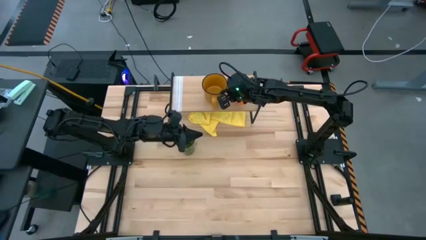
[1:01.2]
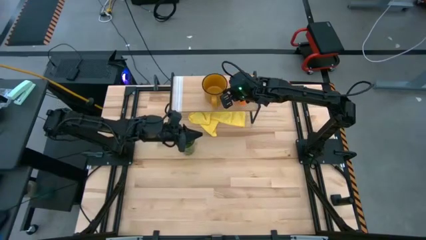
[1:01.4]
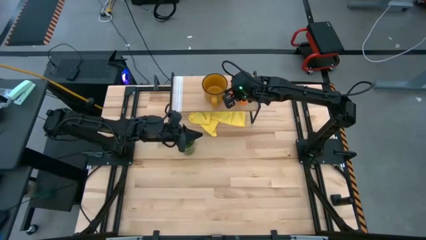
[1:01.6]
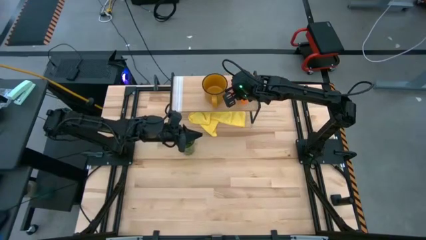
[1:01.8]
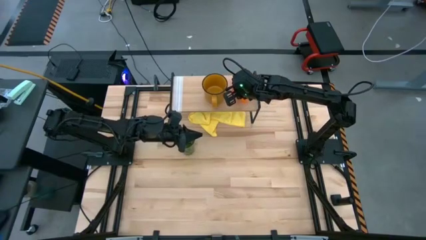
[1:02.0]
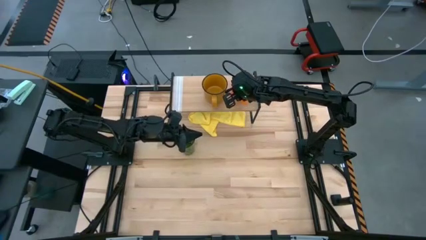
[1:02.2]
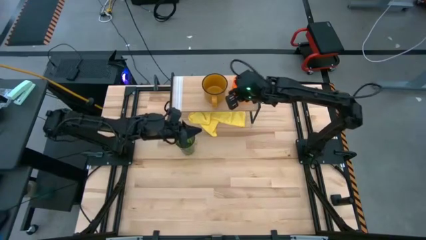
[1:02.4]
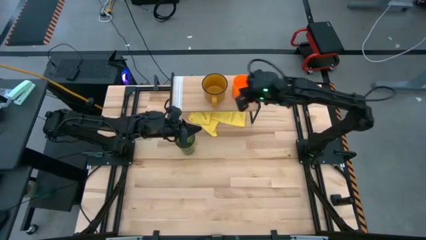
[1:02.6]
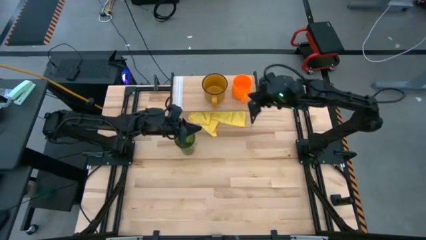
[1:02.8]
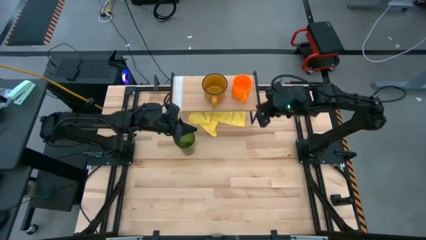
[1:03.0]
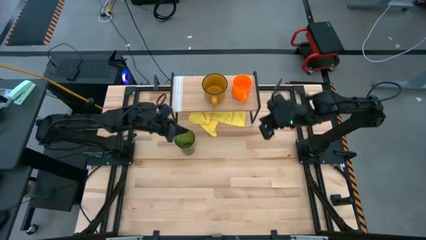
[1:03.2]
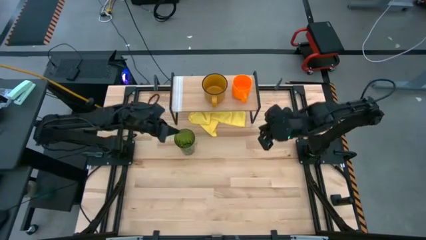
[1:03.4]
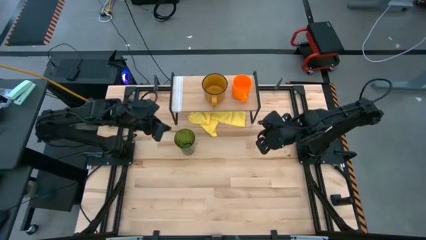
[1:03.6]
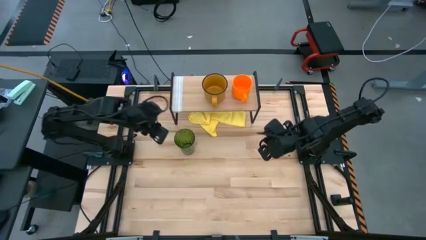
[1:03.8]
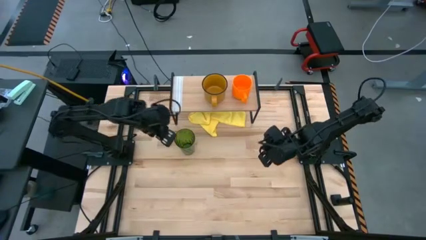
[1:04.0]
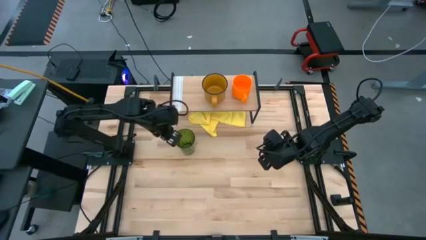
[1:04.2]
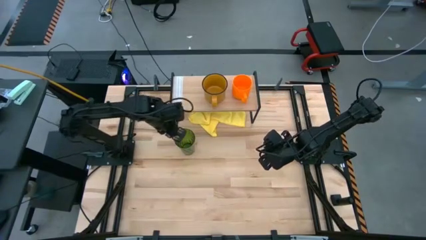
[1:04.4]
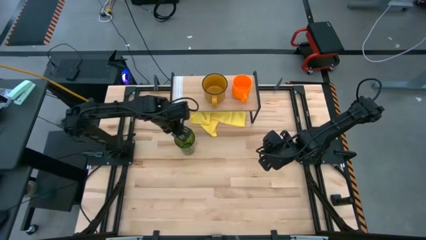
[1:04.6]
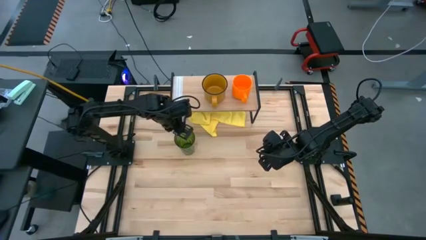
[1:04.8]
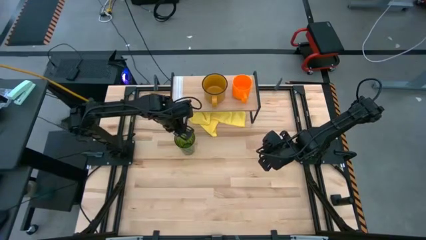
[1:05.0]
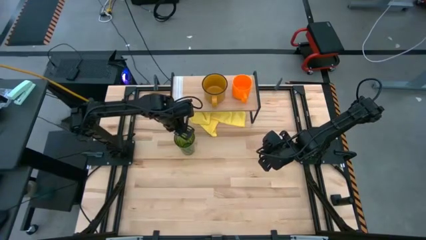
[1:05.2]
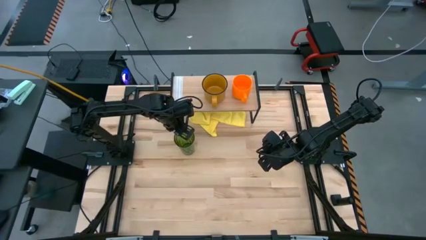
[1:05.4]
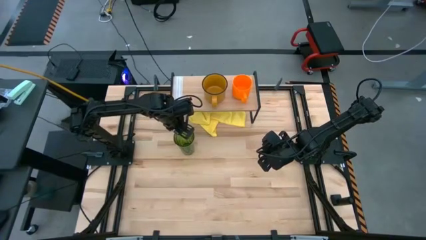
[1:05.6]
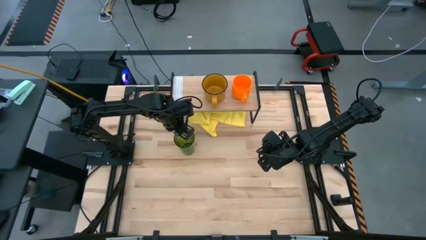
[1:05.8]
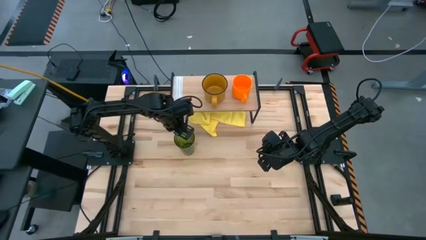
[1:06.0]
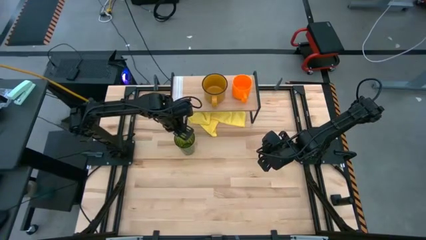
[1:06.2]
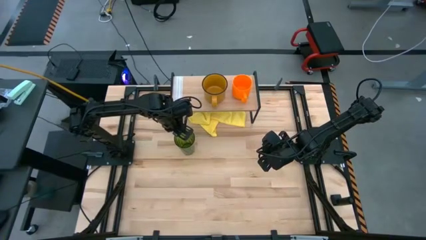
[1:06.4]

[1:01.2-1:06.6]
Task: Stack small to large cups/mugs on shelf
Put the green cup on the shelf

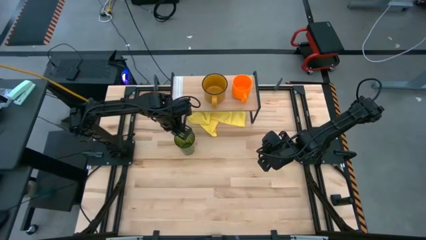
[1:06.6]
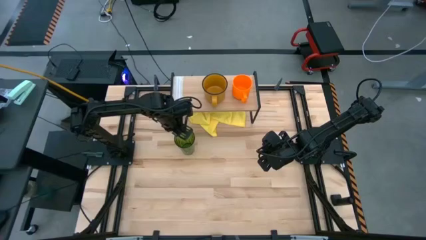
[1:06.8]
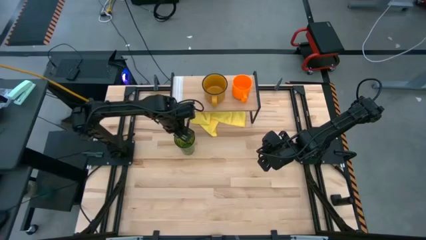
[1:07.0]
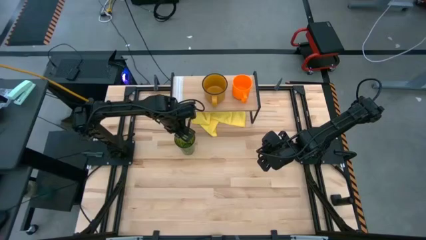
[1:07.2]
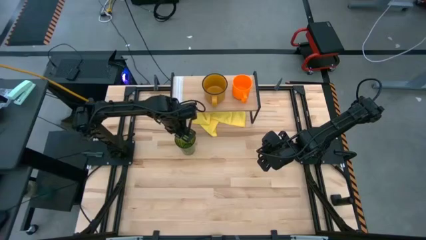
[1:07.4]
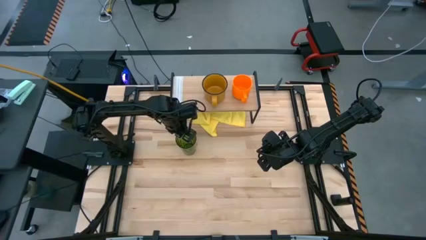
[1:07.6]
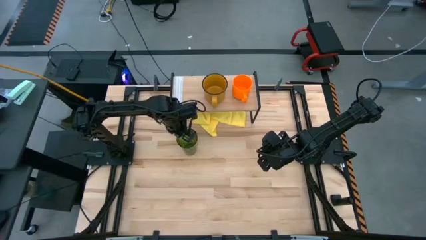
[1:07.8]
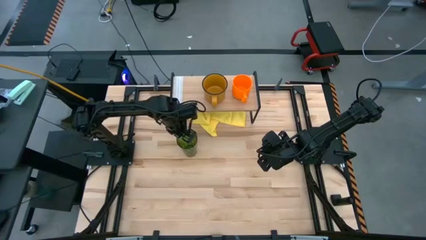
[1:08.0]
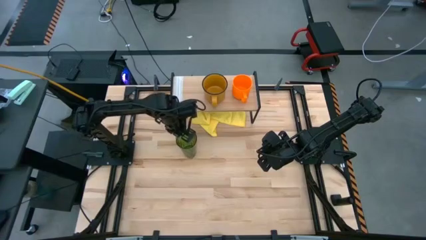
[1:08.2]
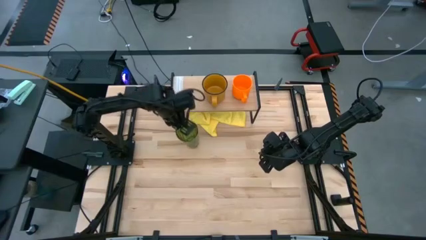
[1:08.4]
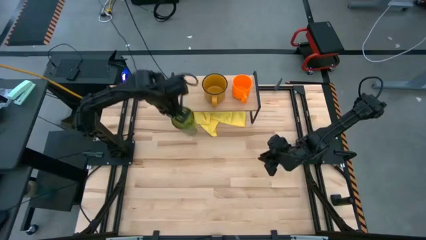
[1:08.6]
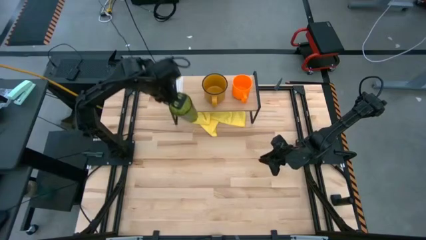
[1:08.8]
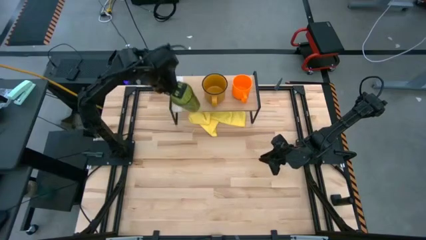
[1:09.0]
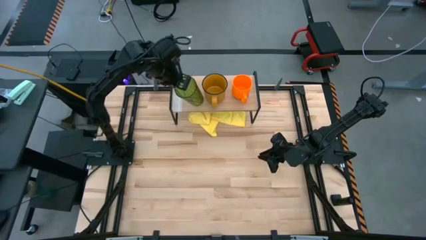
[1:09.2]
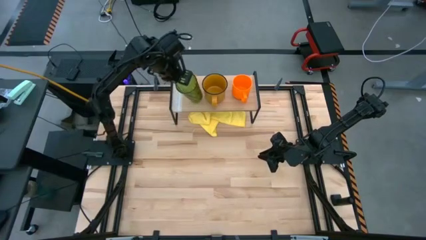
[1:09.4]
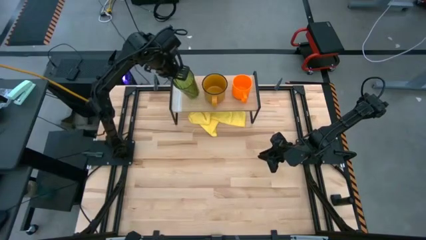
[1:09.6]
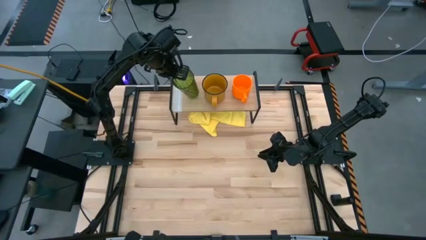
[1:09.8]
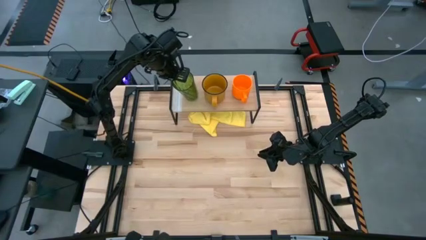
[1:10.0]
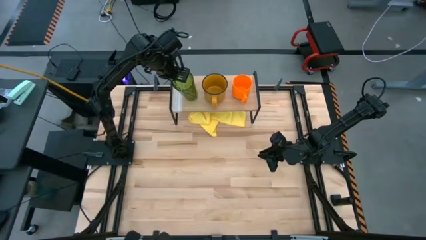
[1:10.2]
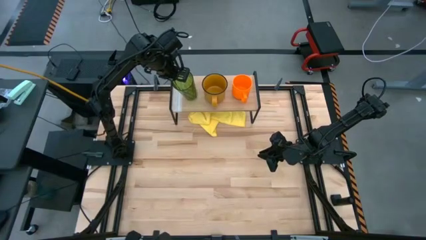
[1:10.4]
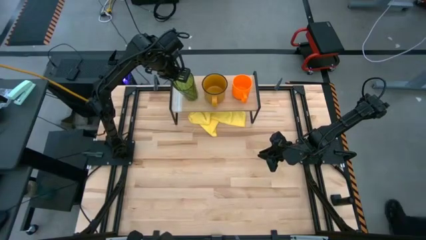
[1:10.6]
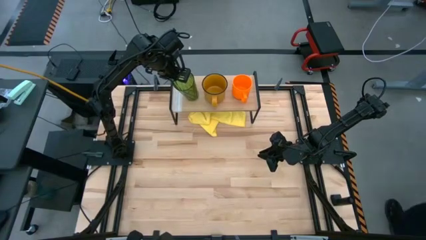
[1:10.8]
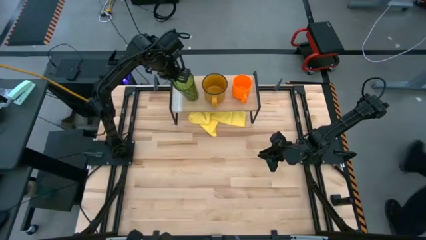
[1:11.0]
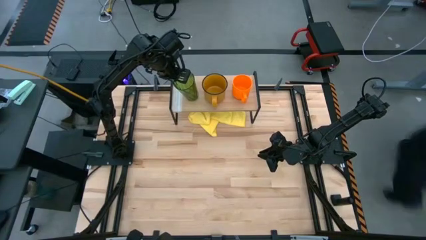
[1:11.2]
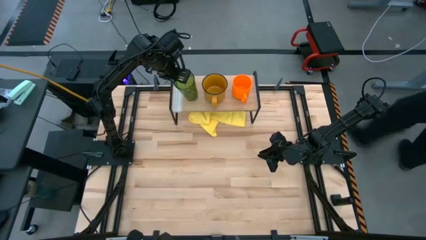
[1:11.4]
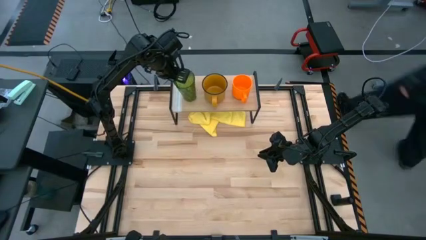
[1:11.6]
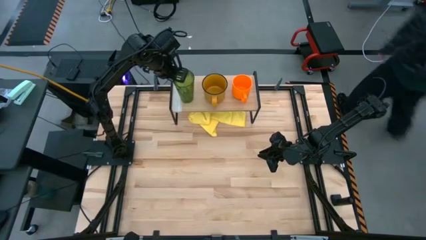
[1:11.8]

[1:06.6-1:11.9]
Put the green cup on the shelf

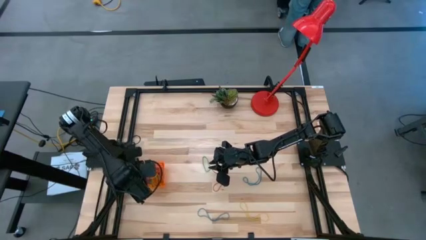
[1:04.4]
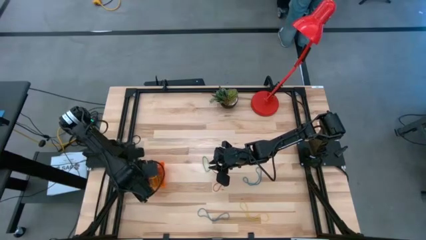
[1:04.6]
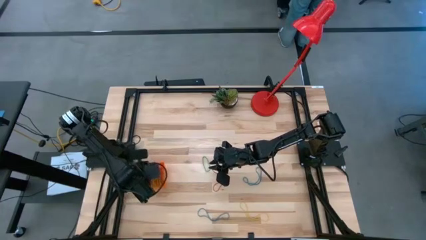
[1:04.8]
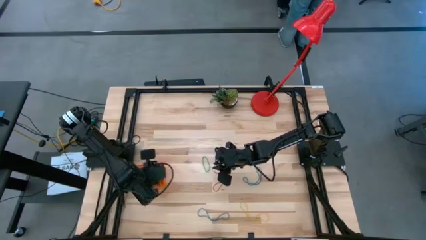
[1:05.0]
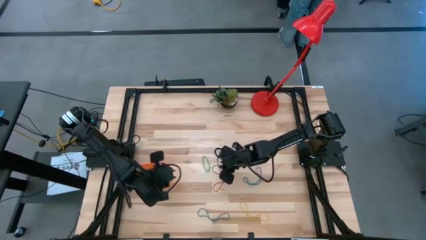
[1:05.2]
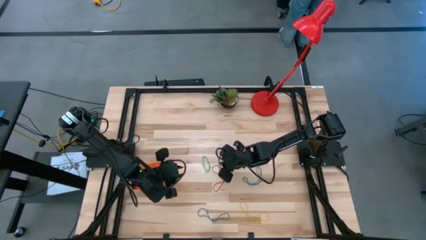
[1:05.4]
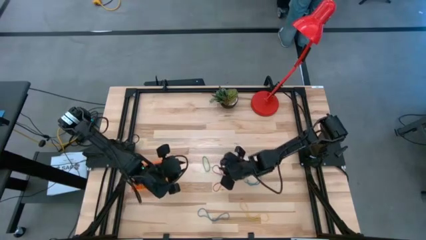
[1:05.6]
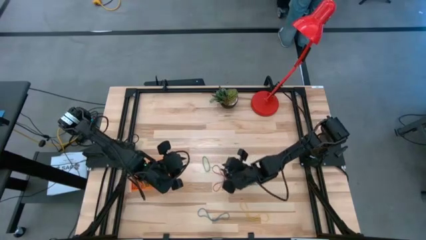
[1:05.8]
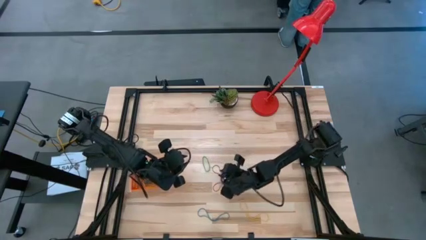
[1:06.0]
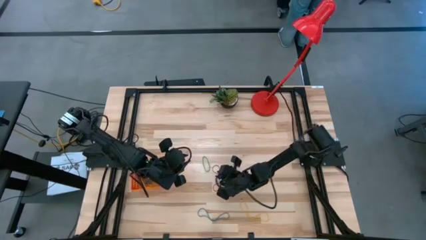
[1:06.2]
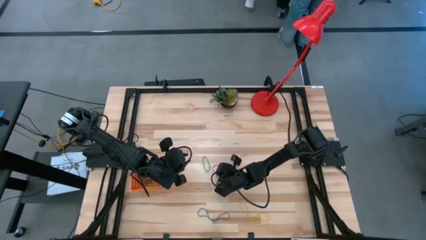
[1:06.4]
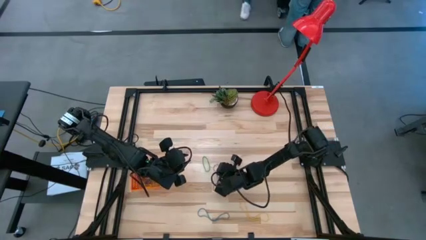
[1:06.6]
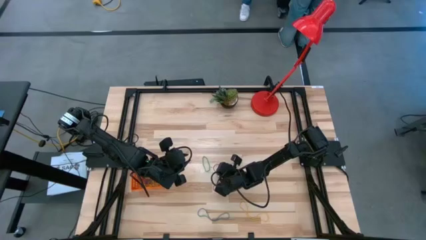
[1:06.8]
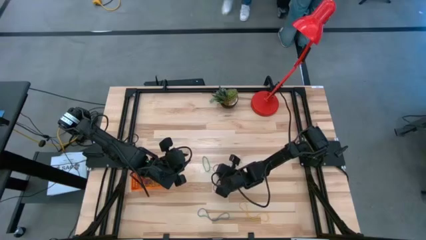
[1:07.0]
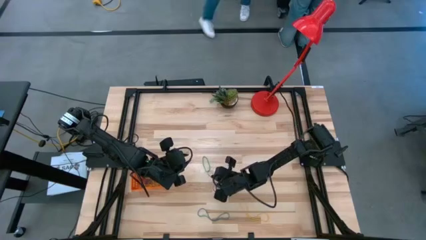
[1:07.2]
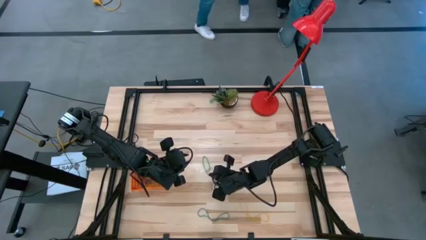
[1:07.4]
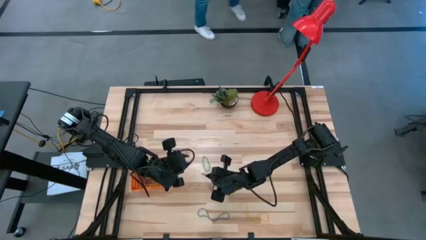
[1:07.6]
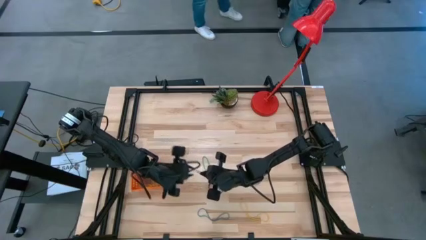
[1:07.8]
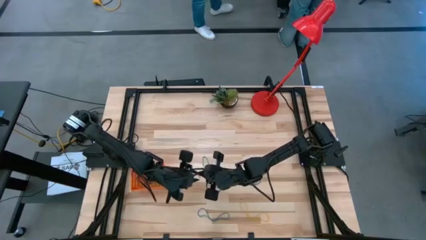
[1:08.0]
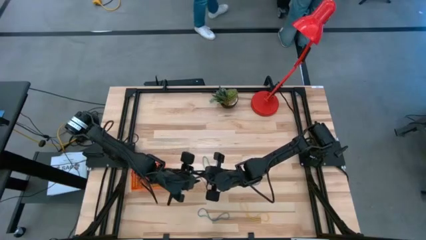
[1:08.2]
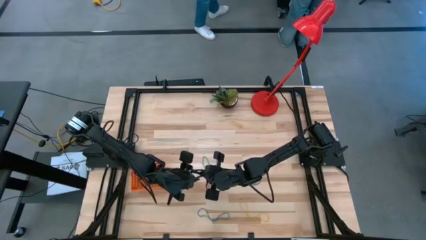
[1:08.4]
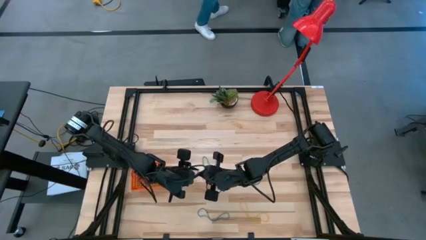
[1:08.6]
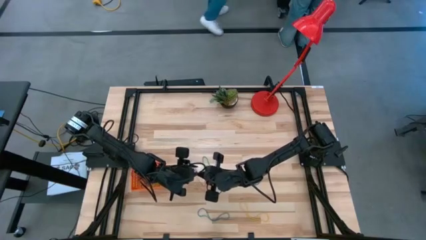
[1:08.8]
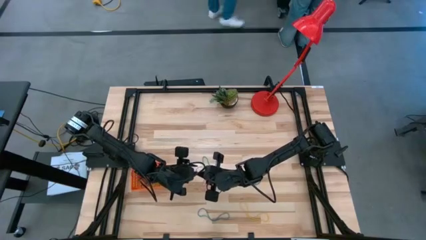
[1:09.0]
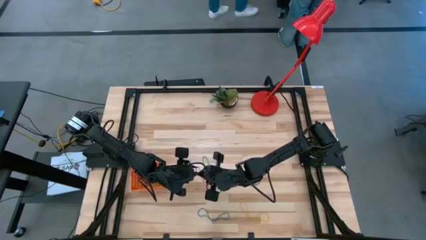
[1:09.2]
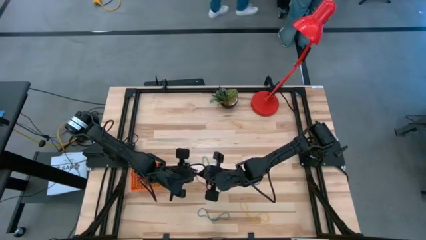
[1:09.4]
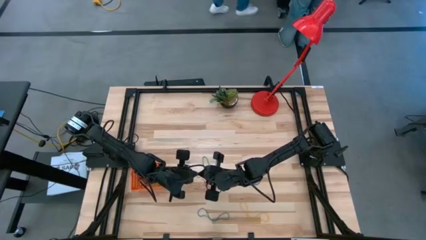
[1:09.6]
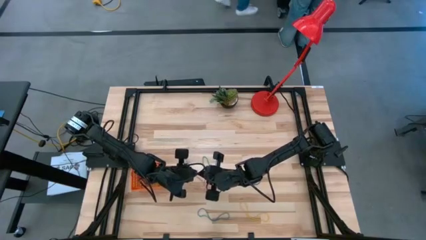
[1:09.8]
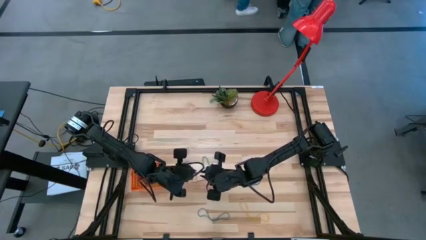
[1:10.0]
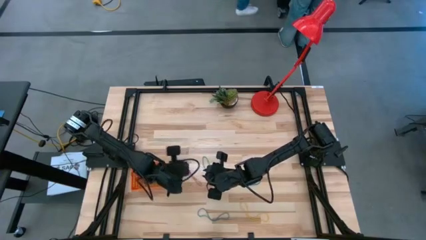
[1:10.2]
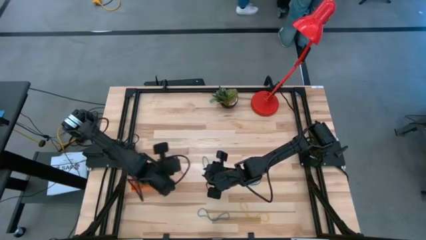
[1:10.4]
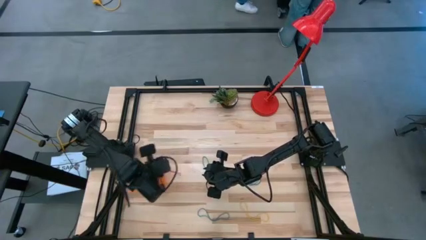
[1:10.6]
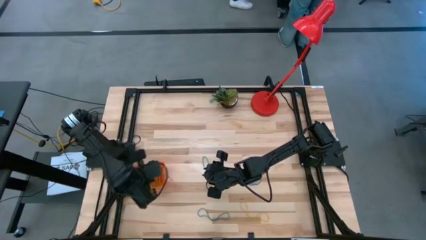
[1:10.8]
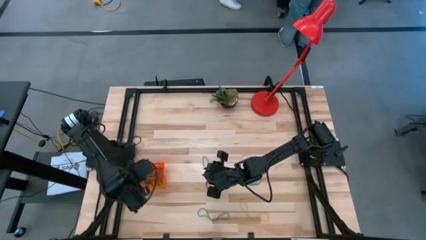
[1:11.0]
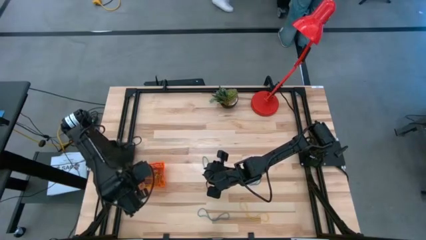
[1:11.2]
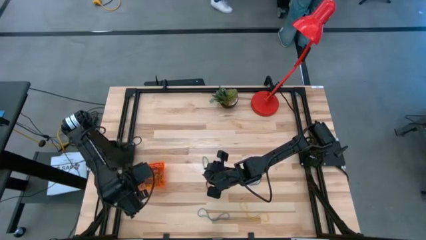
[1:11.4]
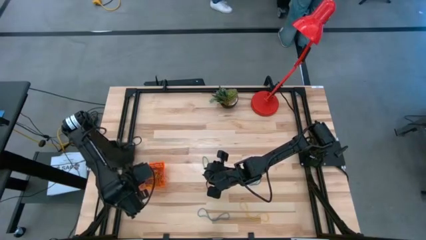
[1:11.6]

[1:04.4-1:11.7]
Task: Pick and place rubber bands into bin
Put the red rubber band into the orange basket
